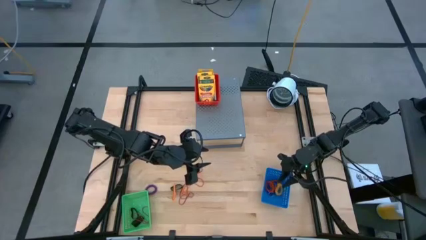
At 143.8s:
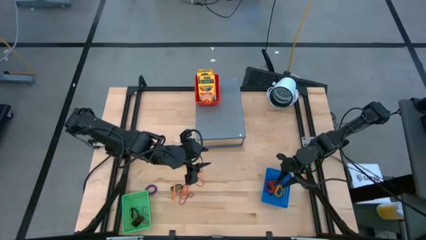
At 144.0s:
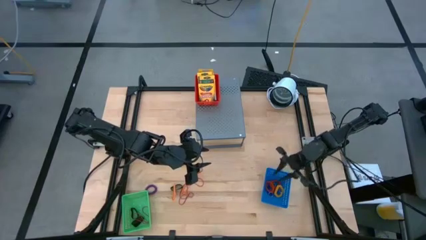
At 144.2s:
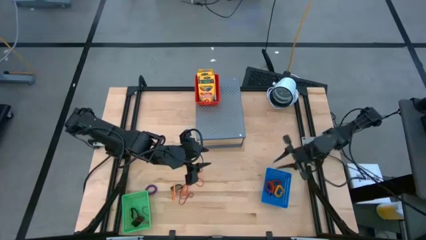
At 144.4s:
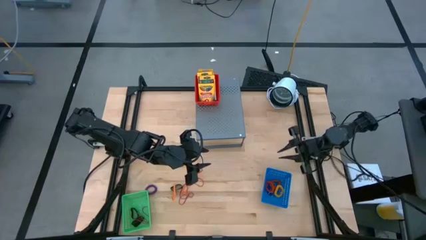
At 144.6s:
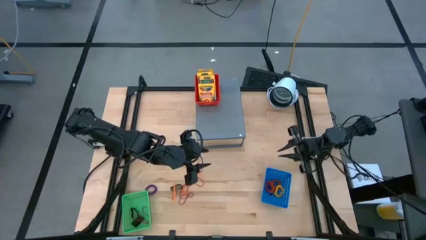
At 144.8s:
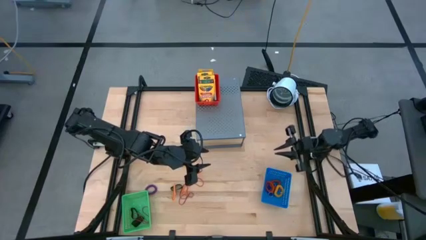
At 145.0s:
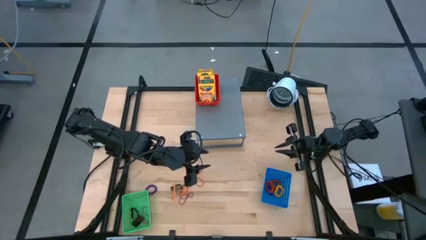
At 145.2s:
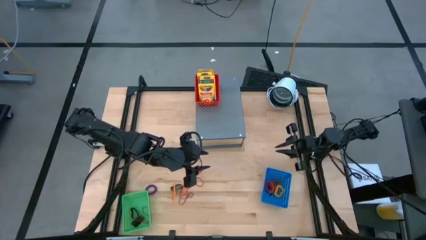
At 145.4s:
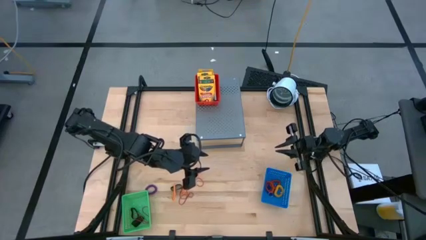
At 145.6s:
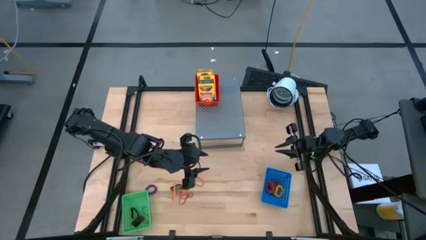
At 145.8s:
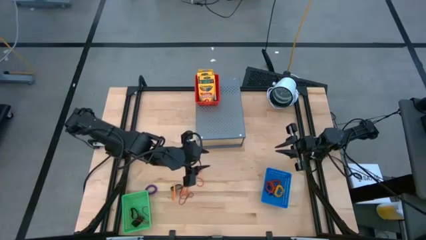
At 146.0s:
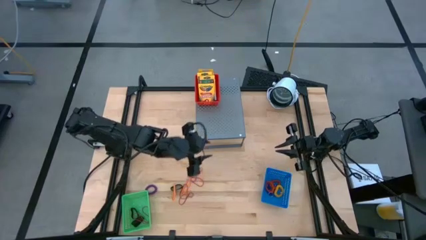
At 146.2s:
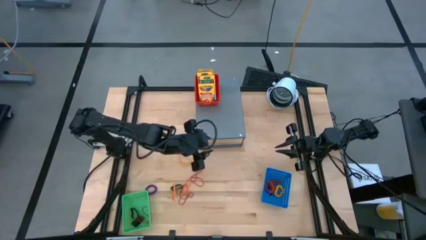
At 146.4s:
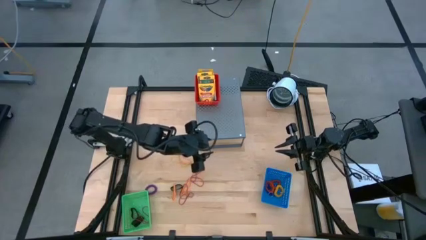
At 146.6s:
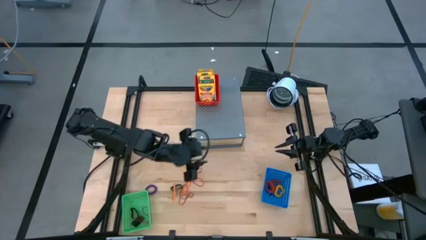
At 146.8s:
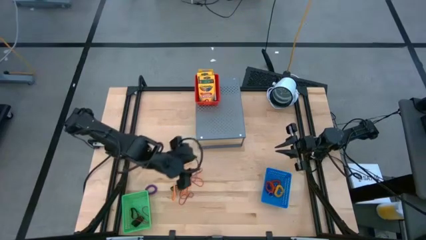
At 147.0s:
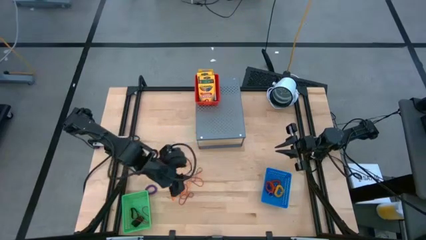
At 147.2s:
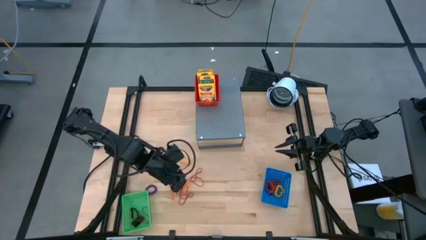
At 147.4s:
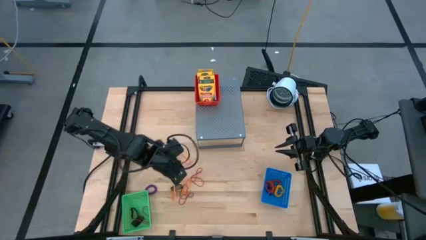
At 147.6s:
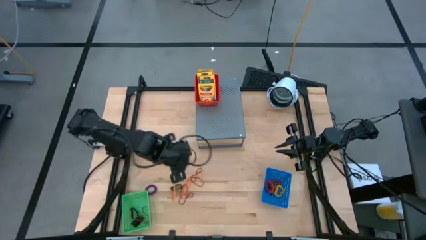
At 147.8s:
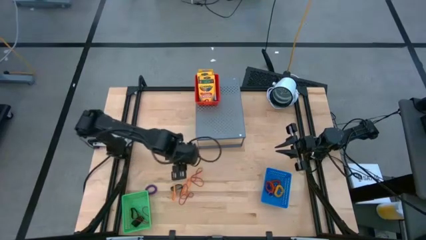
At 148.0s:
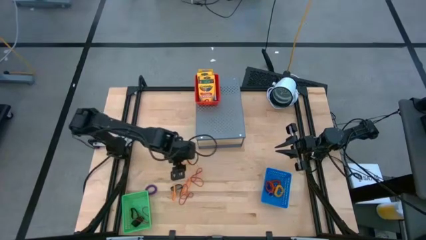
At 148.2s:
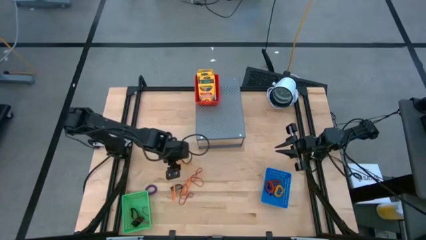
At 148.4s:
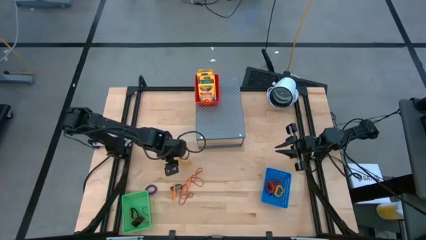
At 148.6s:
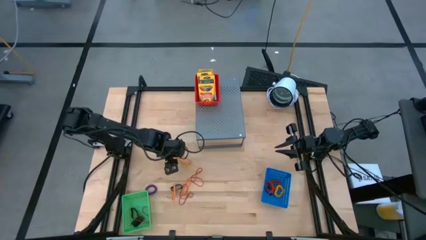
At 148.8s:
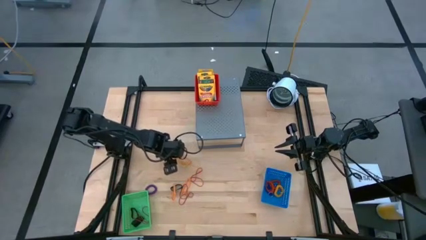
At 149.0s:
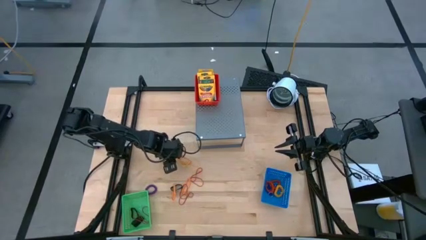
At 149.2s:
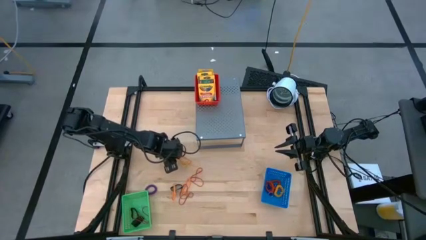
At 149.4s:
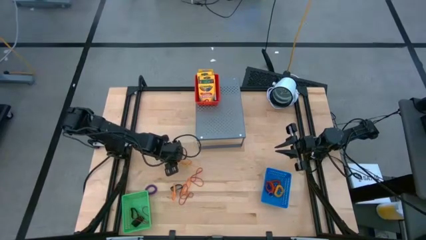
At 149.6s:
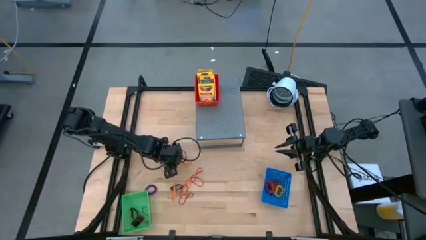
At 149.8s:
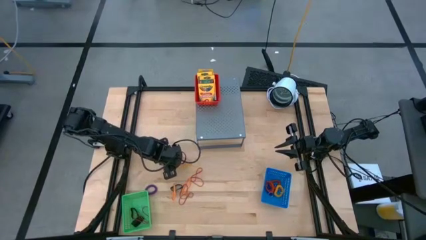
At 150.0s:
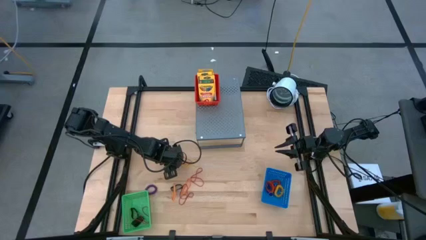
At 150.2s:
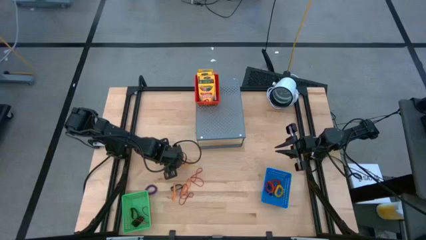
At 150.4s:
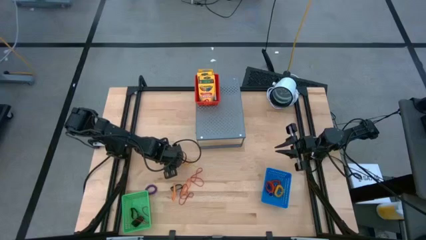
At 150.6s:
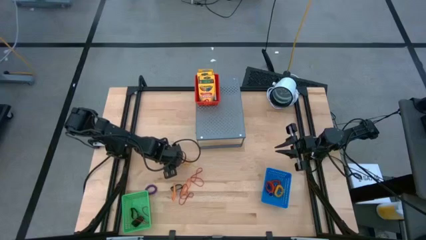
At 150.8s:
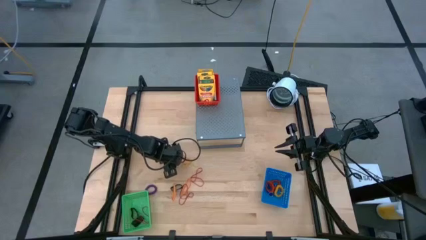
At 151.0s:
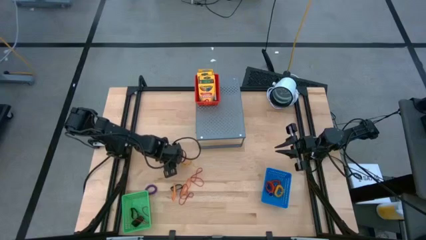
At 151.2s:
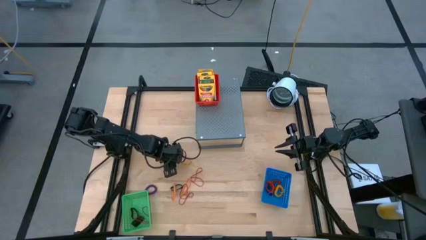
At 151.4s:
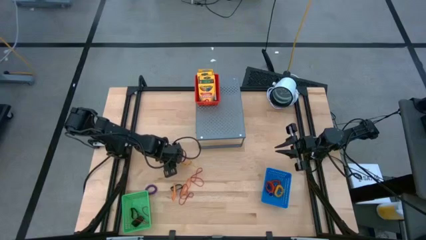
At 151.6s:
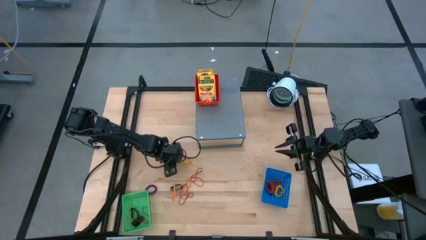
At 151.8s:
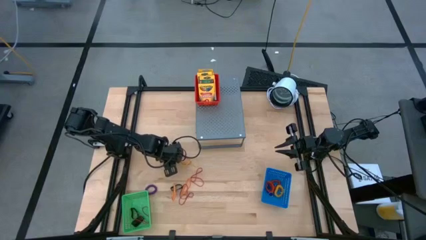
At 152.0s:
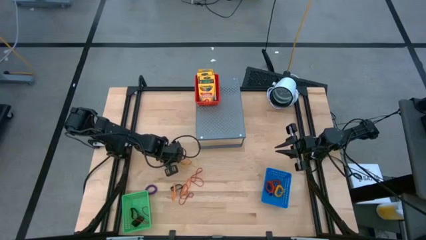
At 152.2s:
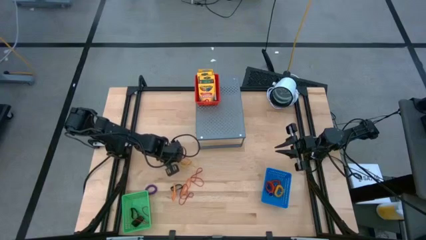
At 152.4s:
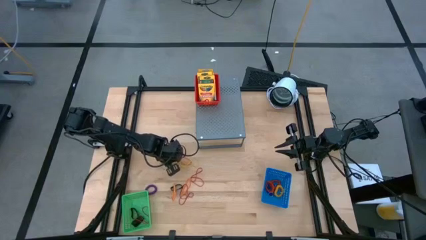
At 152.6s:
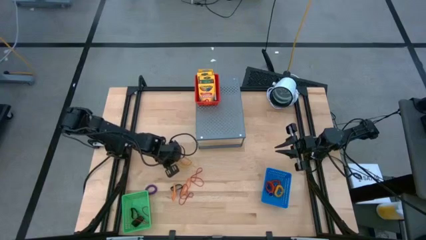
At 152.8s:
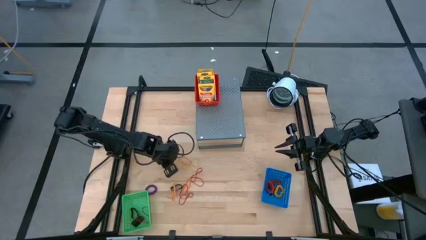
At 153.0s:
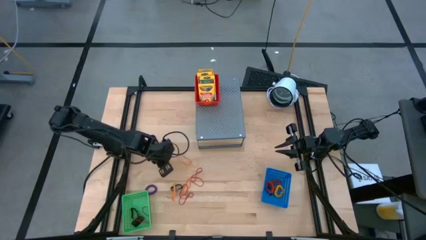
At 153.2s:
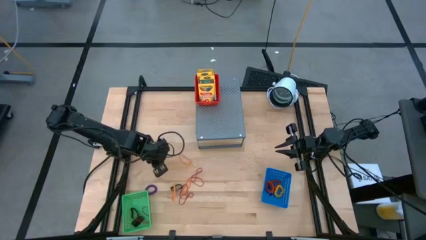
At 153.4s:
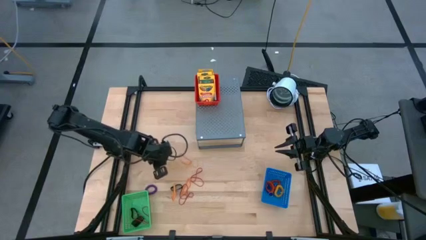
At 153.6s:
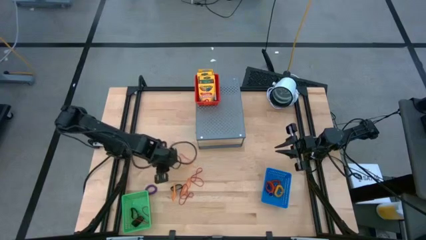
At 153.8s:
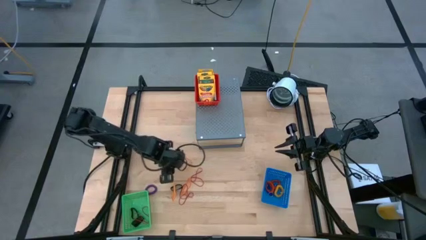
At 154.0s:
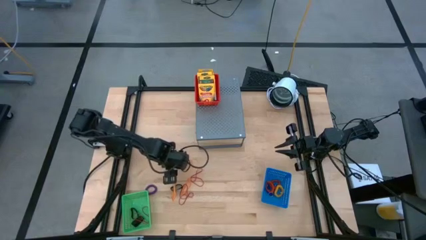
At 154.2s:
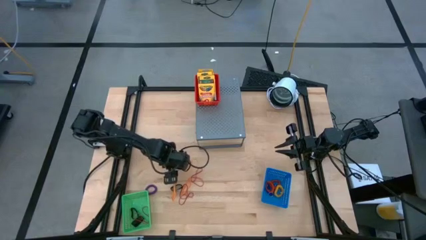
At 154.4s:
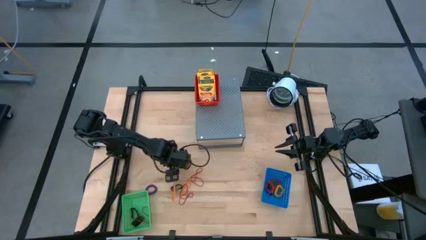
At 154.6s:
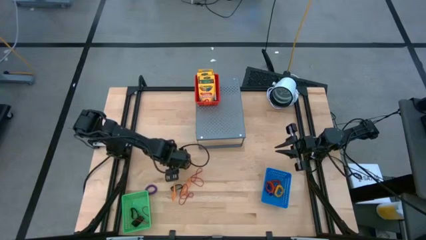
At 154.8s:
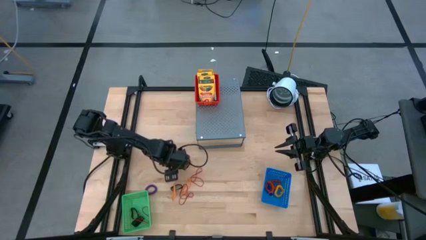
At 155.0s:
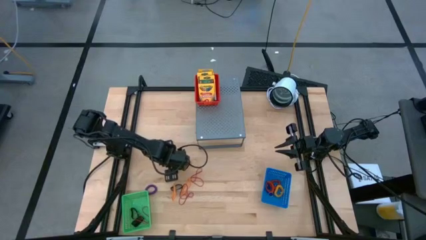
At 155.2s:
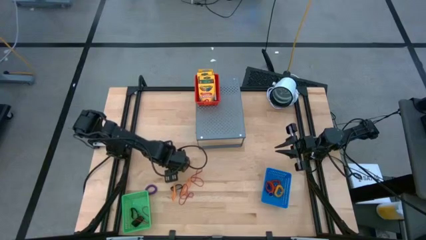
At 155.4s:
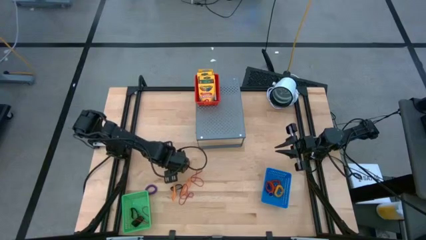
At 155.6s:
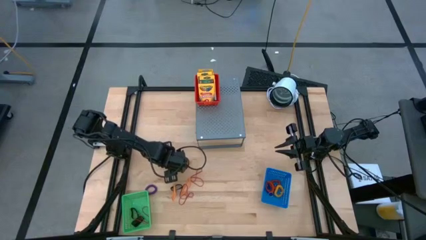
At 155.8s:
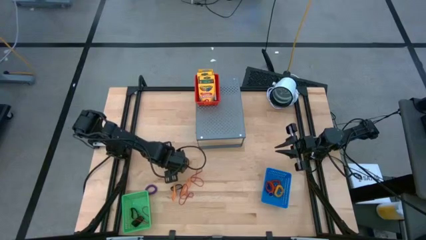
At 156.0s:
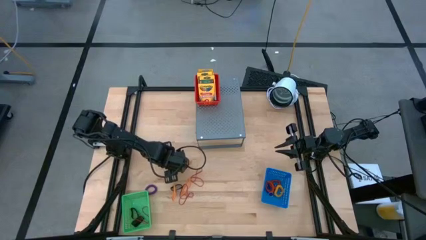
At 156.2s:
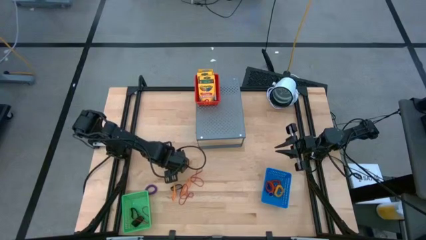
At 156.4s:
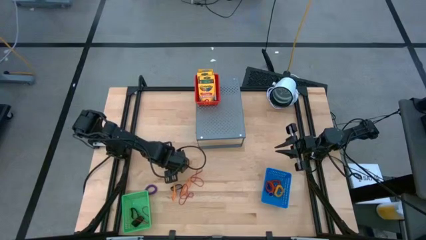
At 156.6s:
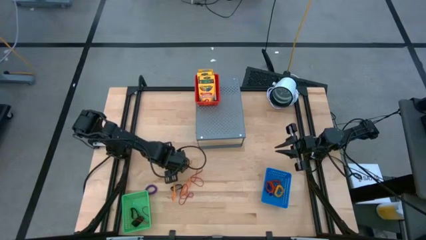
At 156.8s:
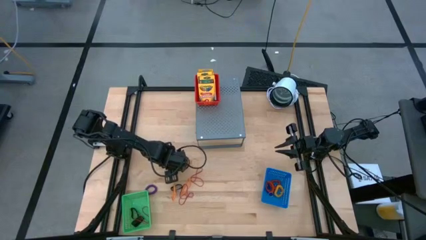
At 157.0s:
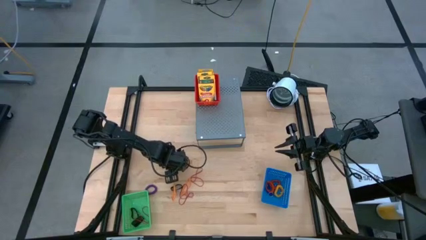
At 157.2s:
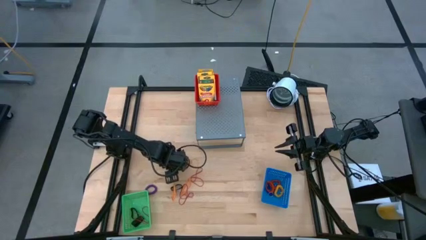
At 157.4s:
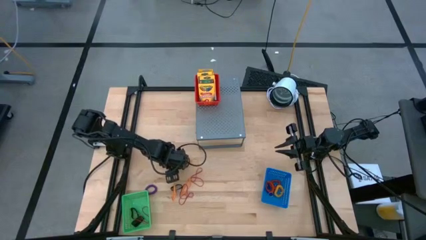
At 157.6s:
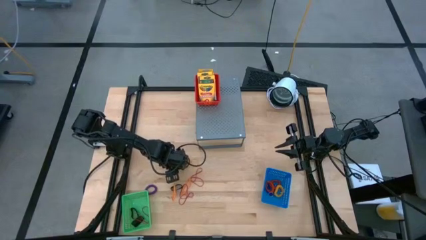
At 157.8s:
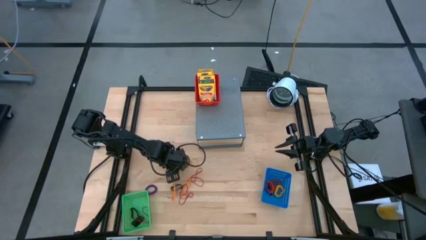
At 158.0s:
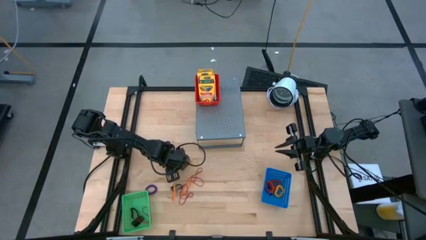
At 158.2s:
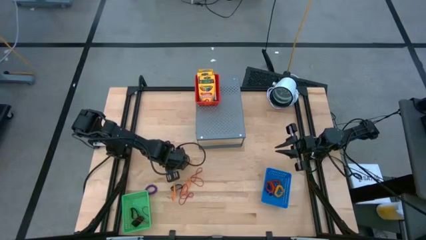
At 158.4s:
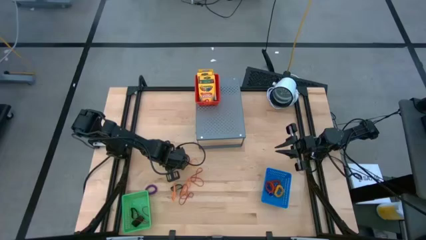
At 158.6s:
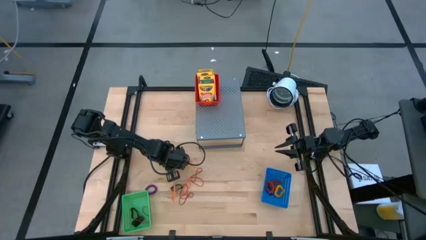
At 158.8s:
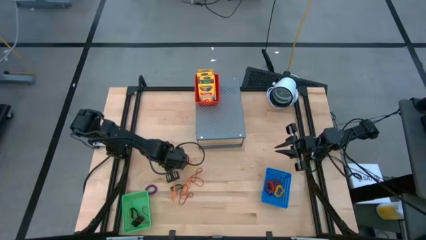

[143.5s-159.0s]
Task: Pick & Place Office Desk Supplies
Put the yellow rubber band into the green bin

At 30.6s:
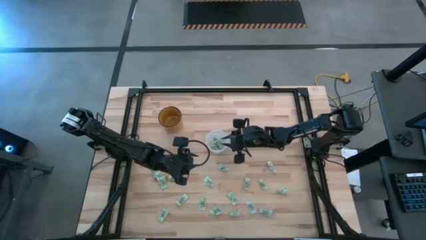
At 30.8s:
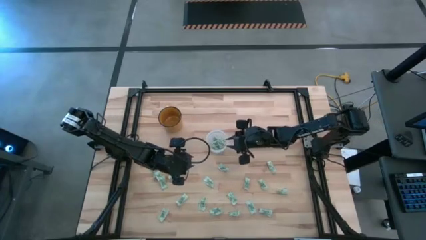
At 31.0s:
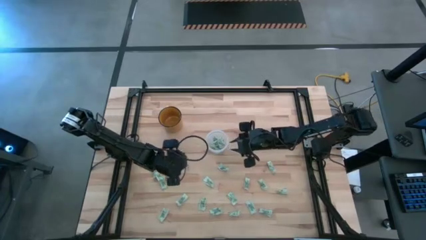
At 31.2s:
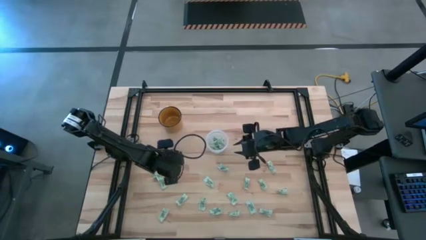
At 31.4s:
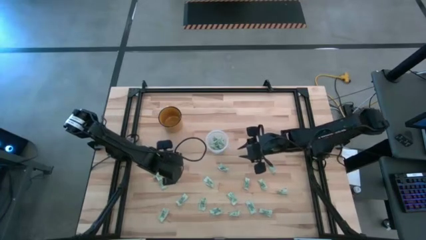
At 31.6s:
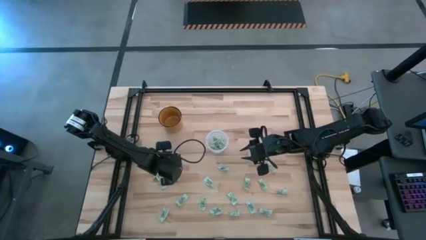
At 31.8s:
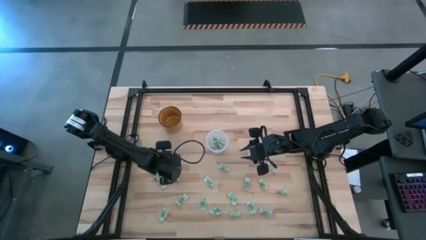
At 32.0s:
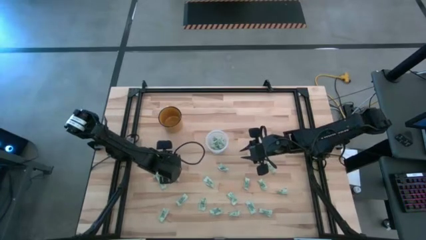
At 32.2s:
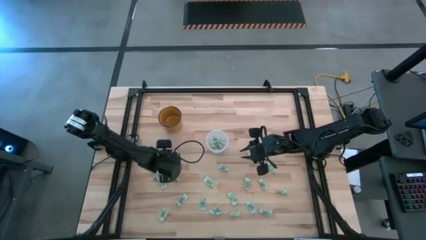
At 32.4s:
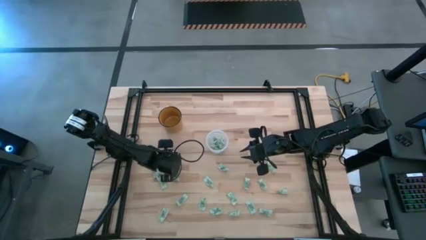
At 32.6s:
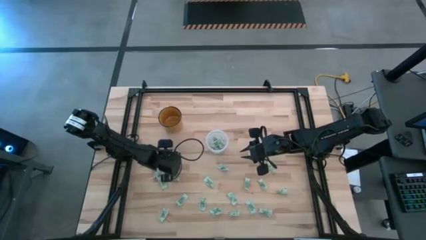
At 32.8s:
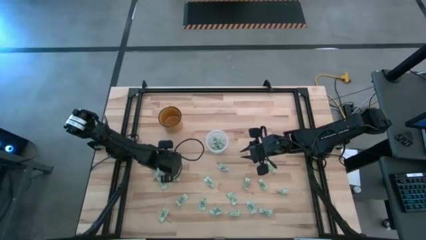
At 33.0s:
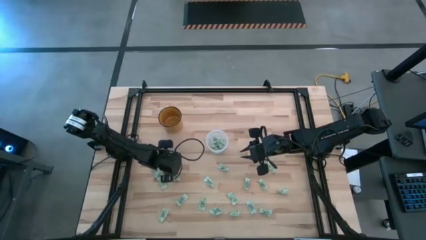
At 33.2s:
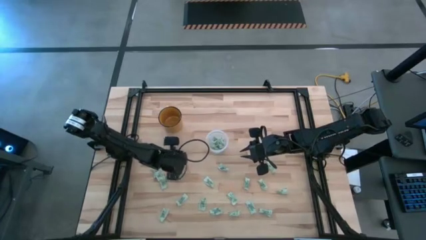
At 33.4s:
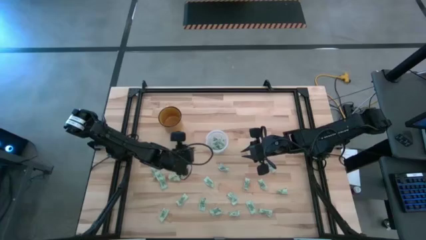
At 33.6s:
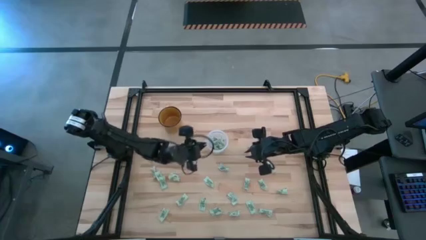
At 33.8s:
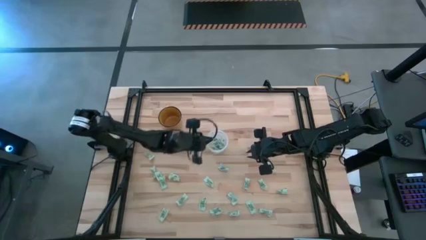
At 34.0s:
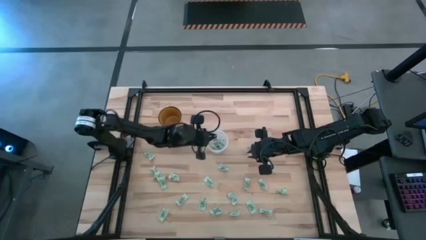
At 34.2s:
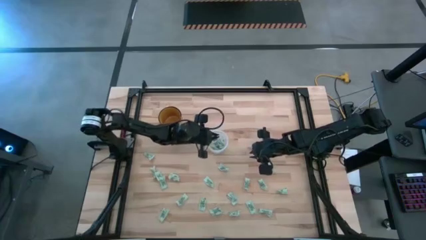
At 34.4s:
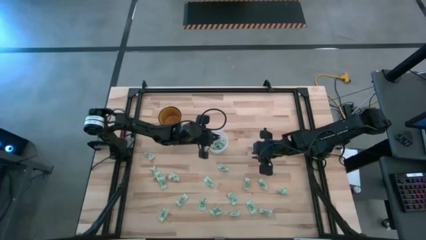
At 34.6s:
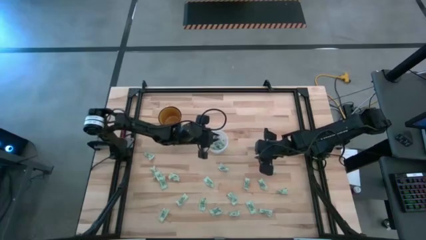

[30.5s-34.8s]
Task: Pick and place Stevia / Truvia into bins
Put the stevia packet into the transparent container
